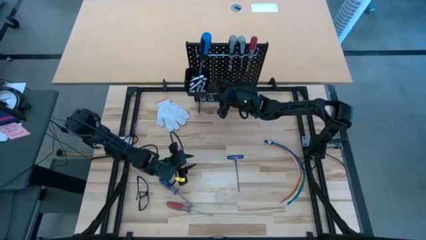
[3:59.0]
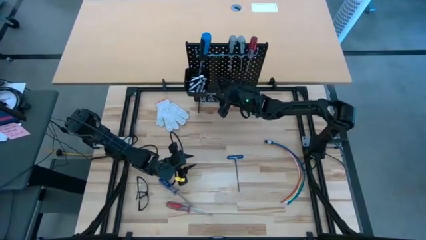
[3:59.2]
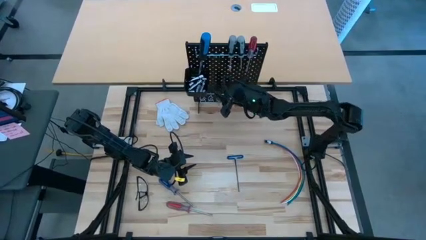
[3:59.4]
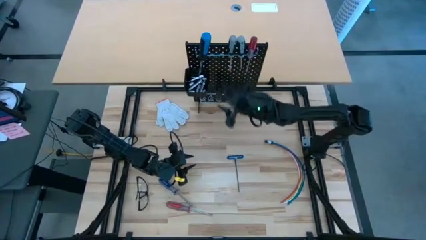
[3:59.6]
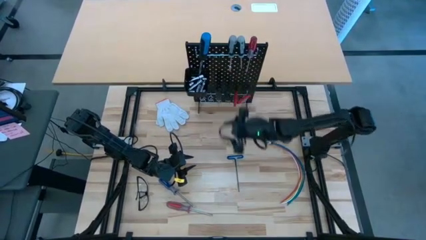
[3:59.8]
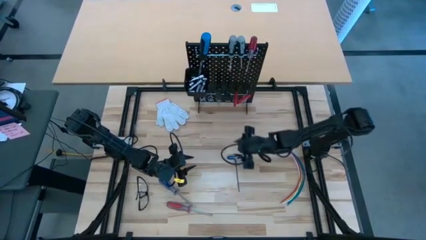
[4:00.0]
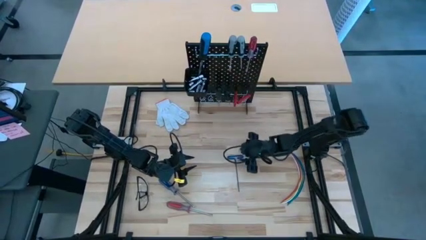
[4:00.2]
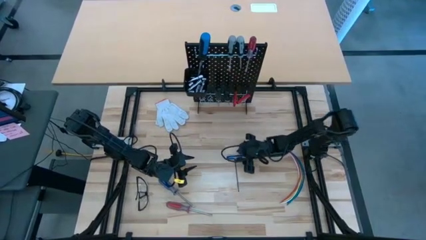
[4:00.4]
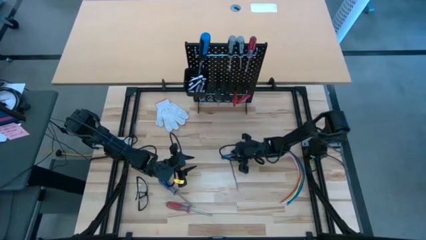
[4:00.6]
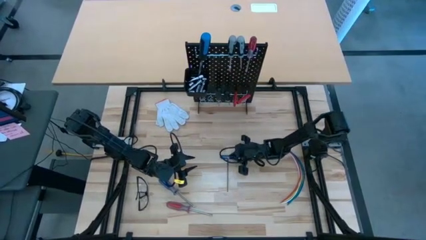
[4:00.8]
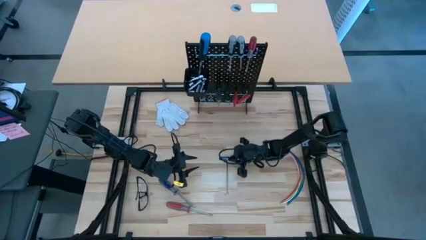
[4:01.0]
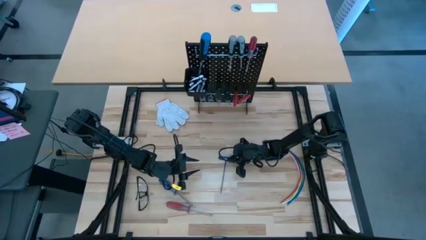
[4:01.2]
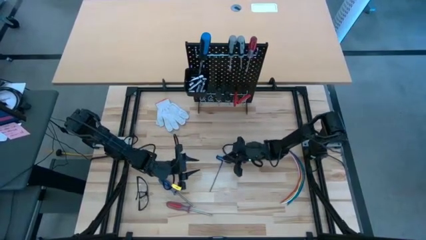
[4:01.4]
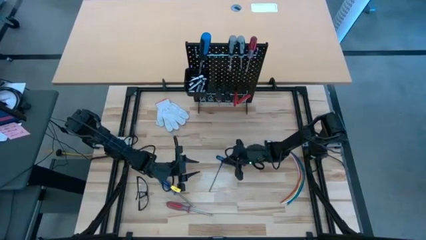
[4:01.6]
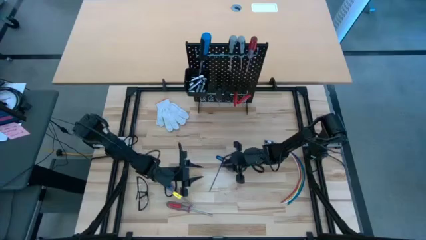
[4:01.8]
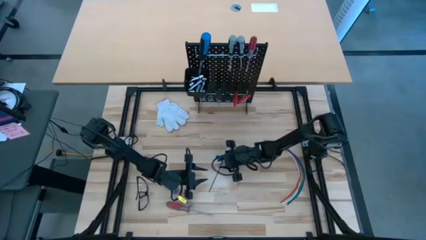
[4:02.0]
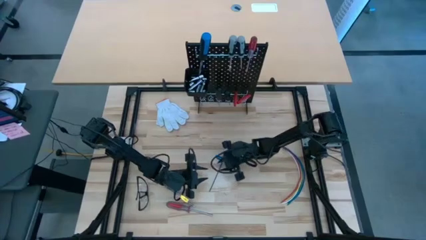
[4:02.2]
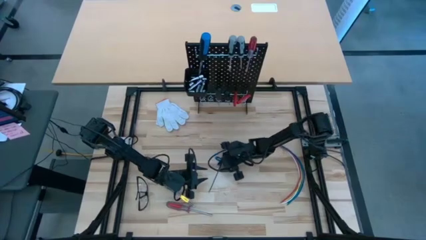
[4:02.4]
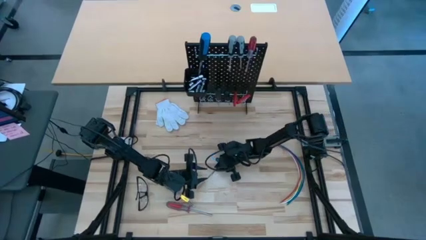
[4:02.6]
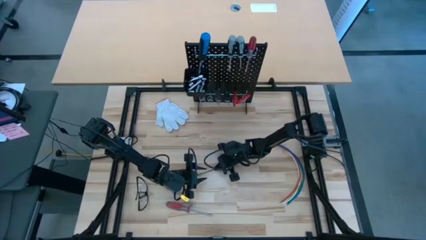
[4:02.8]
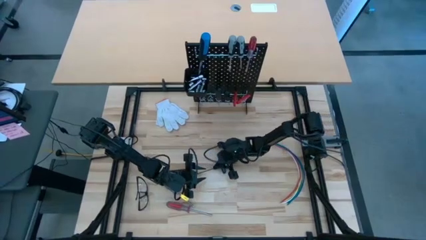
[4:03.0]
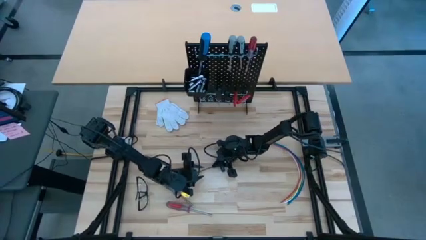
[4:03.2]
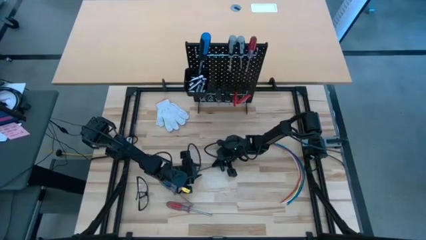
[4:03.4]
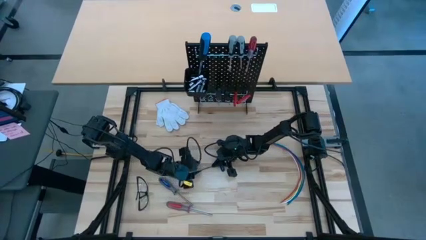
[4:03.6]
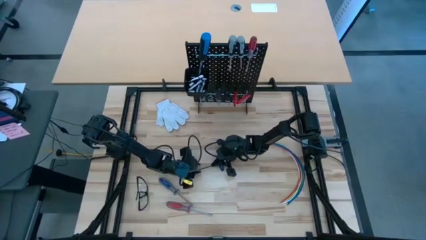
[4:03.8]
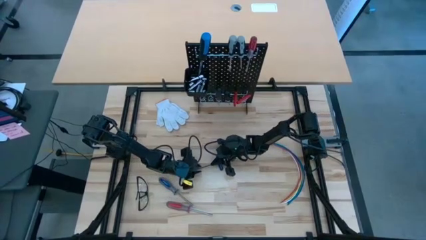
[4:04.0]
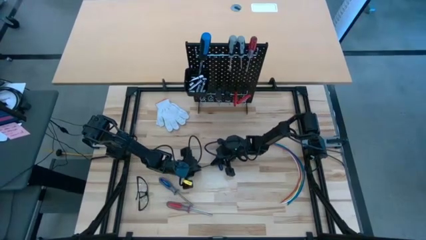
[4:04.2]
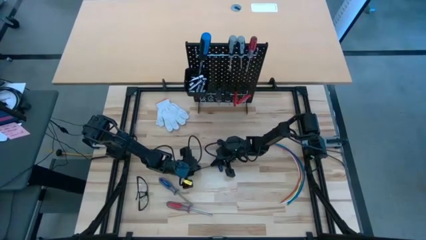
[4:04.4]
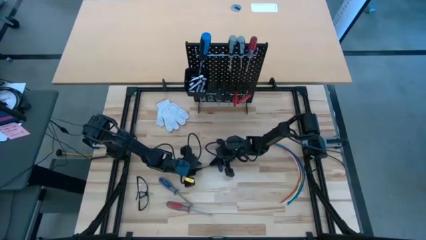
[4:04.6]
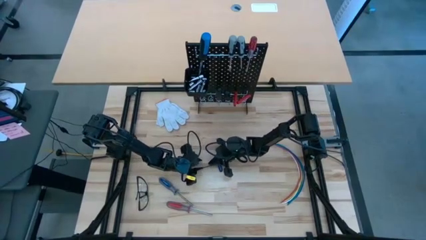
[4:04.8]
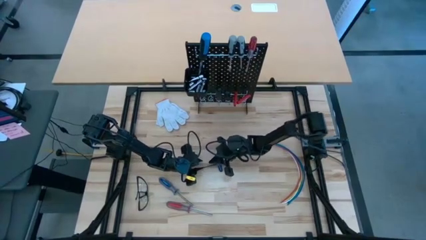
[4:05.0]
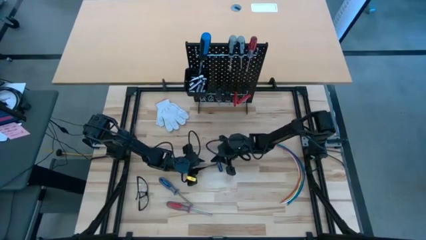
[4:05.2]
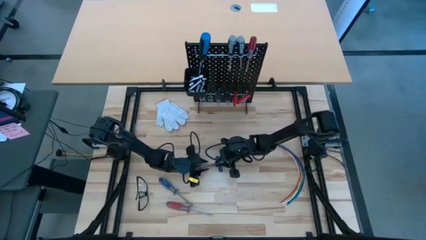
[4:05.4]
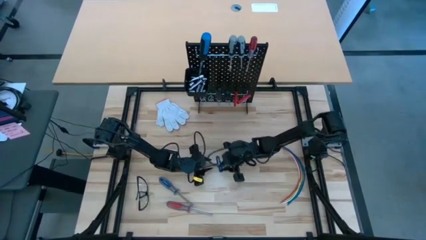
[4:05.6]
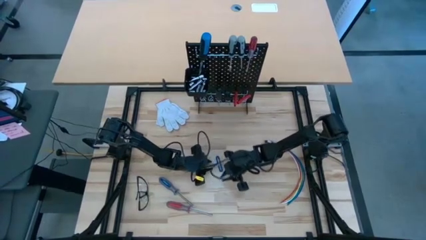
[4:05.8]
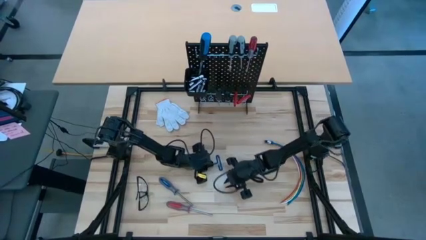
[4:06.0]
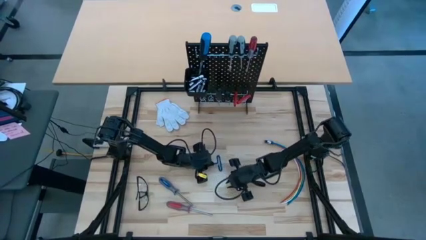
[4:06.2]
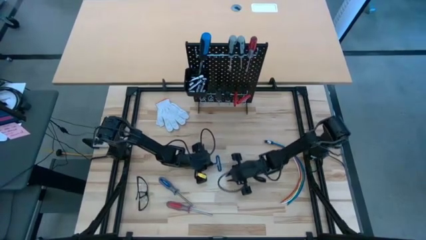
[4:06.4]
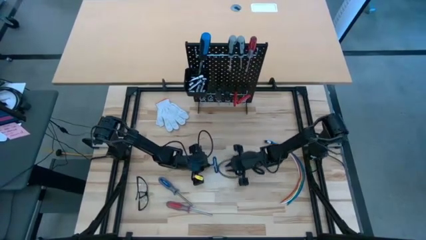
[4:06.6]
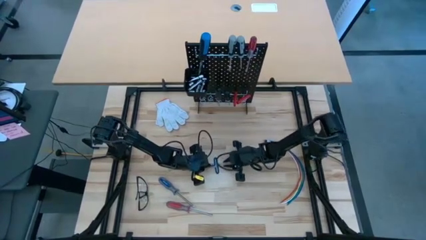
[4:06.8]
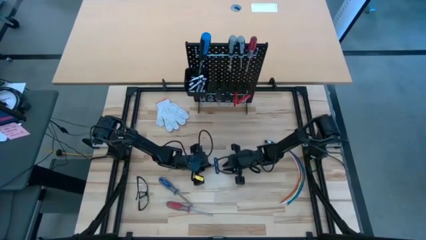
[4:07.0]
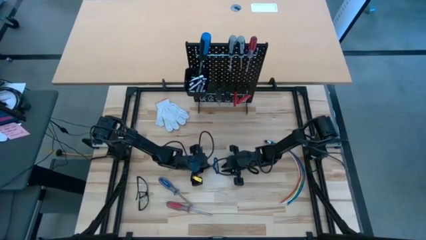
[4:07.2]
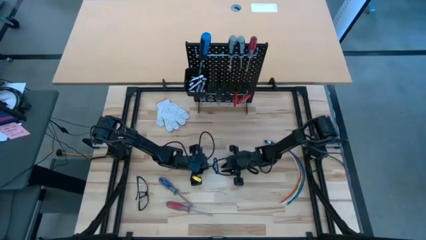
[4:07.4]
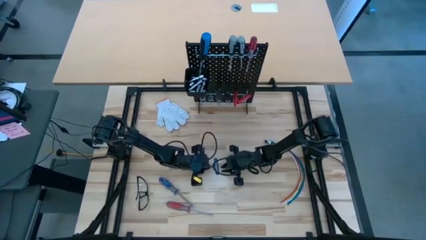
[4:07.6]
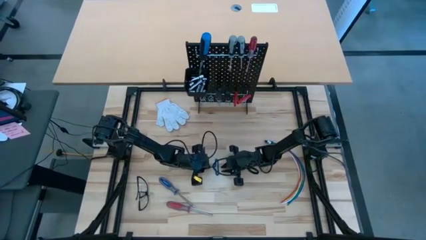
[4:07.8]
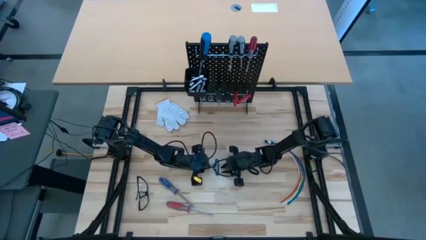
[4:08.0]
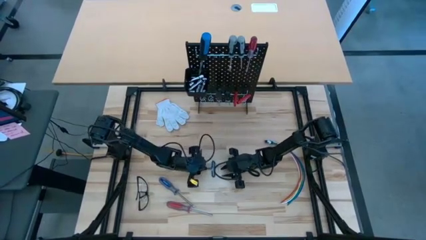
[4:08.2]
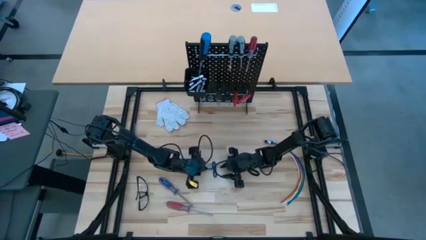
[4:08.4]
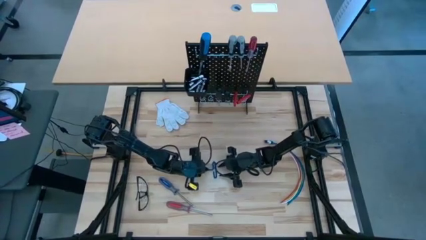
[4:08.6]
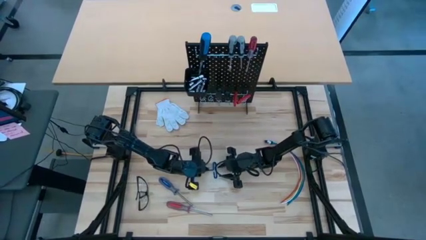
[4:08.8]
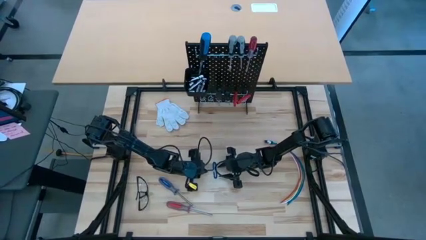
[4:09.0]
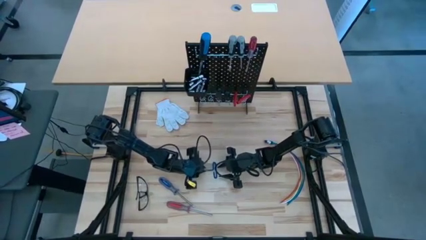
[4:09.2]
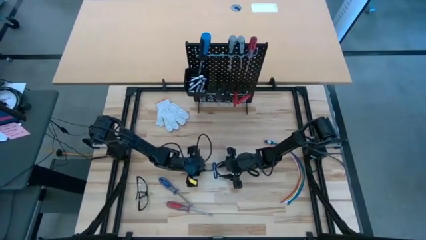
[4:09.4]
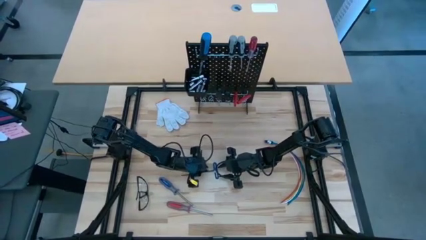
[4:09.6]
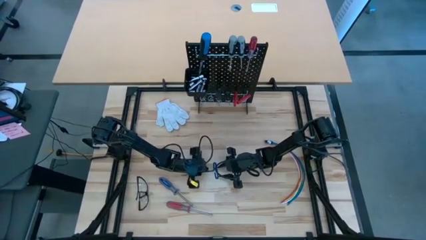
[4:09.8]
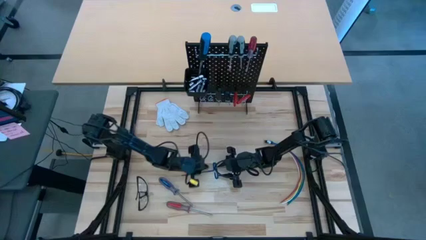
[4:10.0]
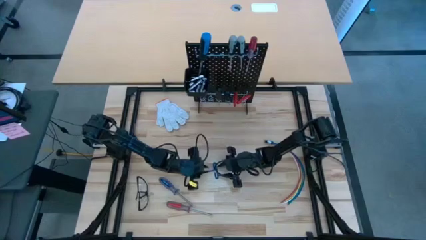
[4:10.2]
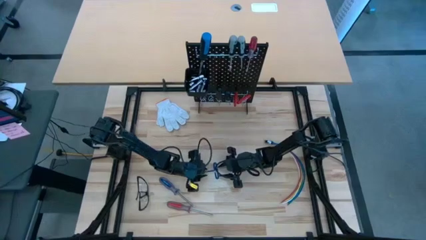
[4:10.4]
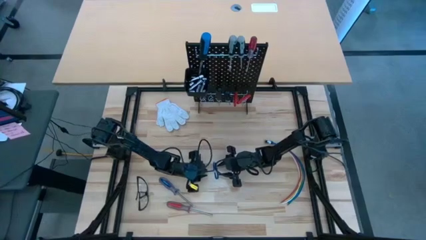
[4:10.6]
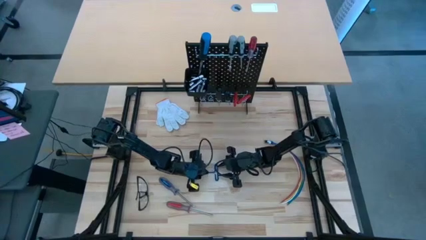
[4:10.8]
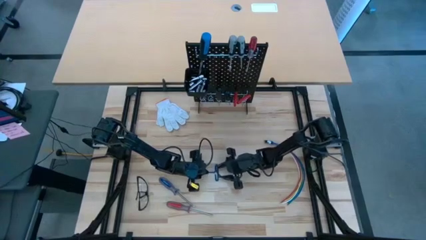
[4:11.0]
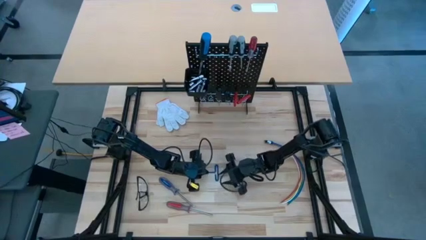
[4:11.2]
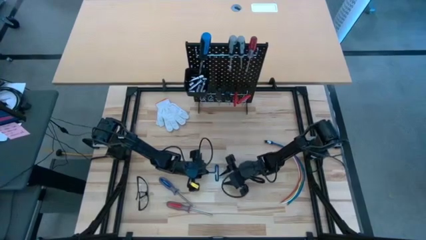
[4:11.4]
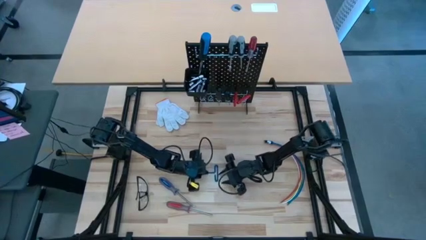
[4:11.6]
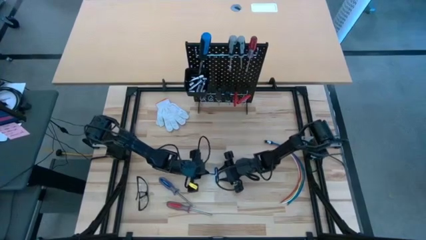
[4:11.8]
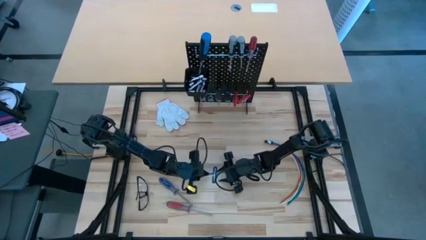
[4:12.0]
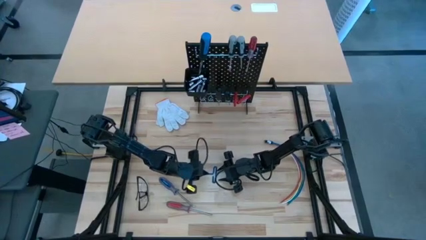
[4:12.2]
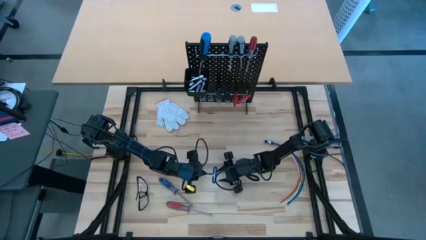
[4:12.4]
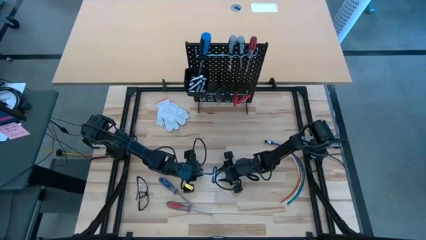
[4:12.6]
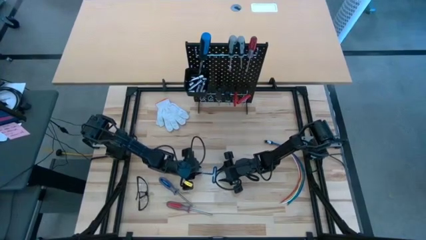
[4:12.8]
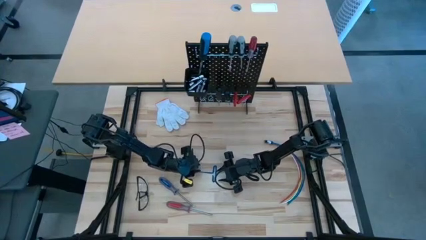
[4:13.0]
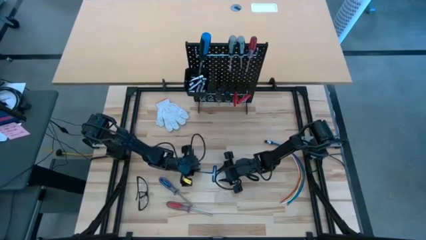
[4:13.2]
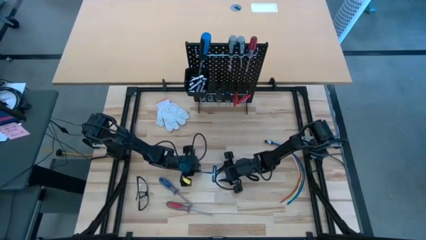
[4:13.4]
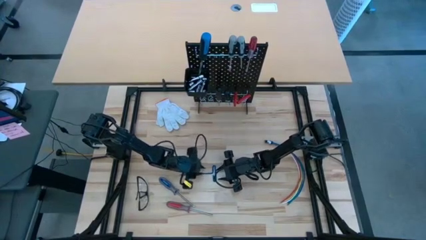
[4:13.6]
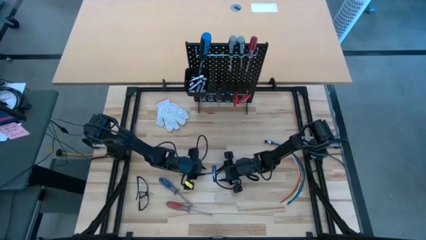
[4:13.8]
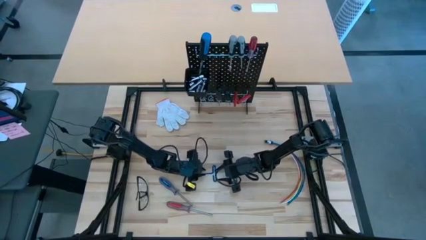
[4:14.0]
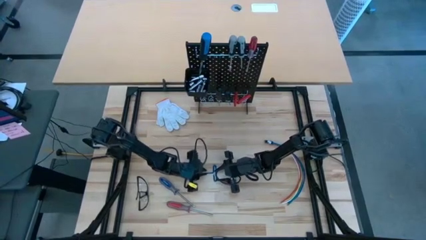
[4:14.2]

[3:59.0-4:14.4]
Task: Hang tools onto peg board
Hang the blue pick tool on the pegboard

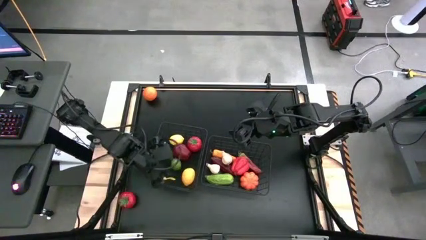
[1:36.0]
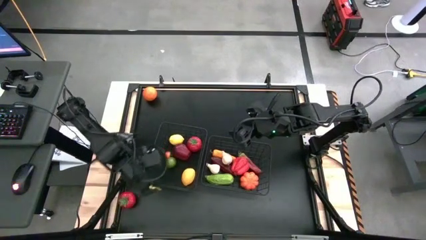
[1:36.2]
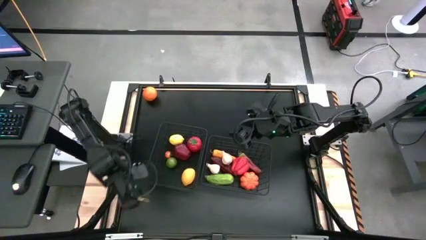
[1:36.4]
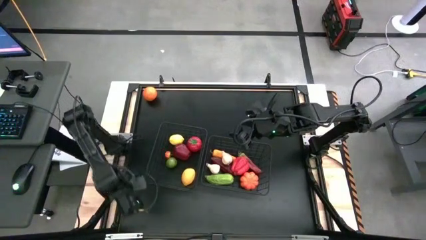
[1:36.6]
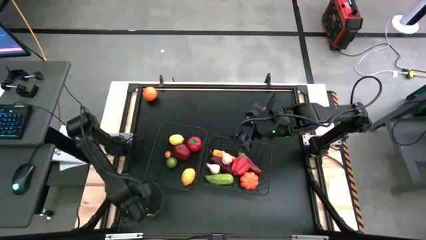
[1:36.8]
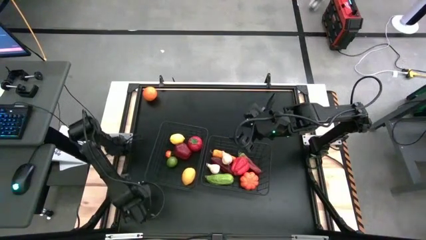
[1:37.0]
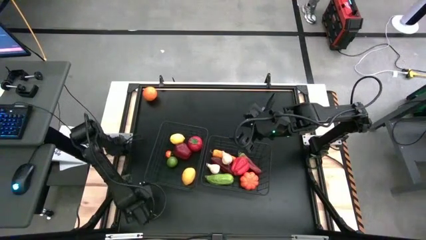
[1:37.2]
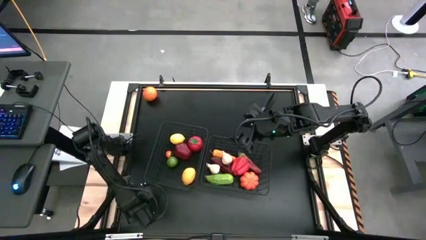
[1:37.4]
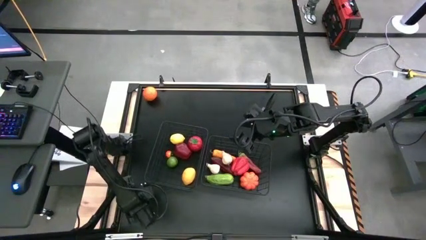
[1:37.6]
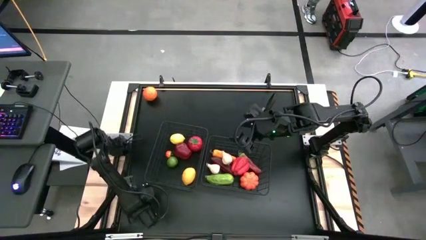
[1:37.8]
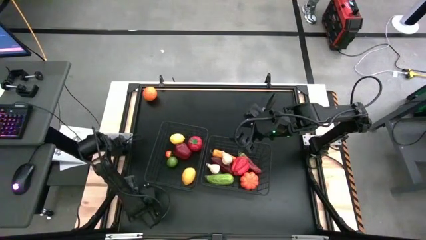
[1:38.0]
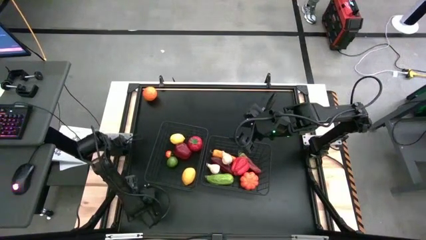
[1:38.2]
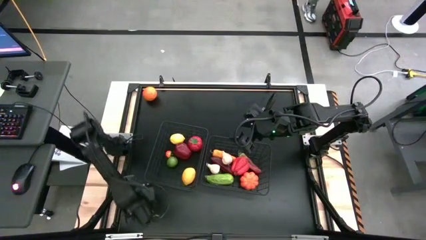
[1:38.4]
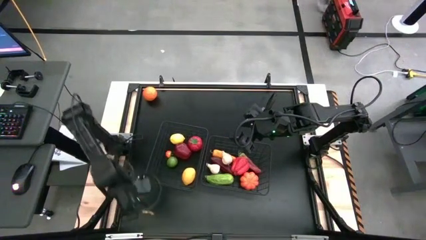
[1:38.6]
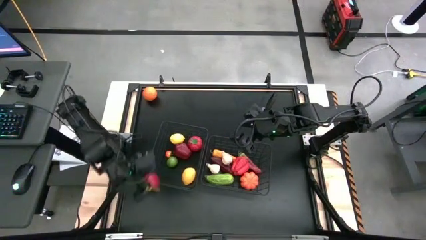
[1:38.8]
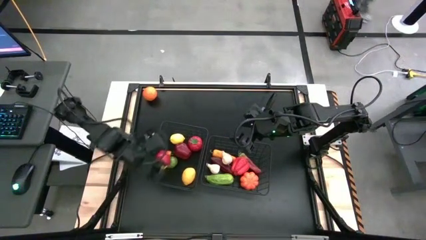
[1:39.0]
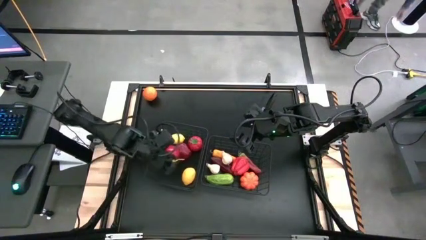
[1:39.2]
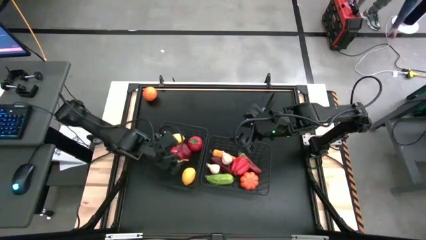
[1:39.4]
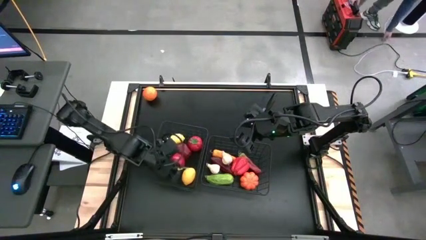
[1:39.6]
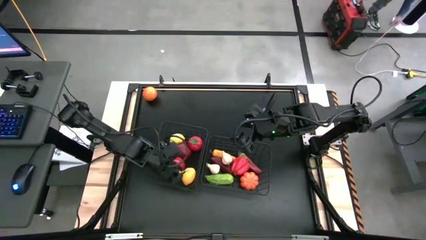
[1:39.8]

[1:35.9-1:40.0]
Task: Sort produce into baskets
Put the red tomato into the left wire basket
